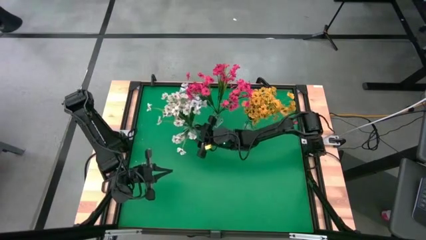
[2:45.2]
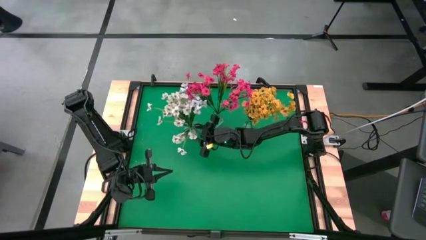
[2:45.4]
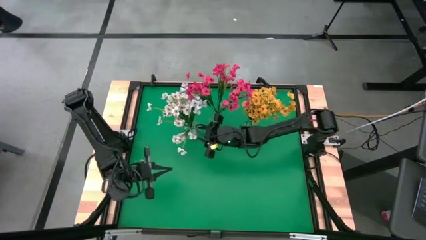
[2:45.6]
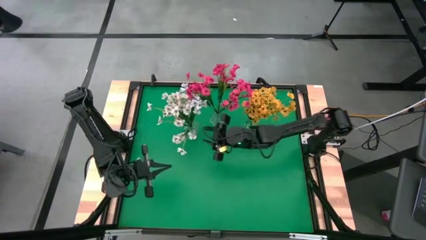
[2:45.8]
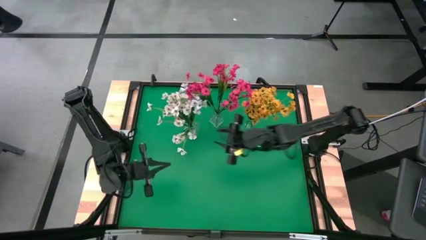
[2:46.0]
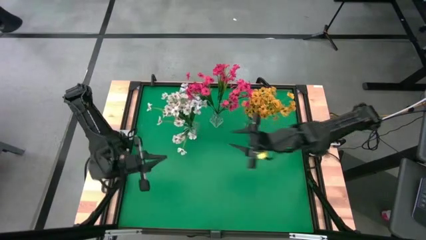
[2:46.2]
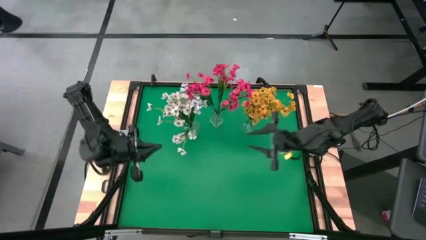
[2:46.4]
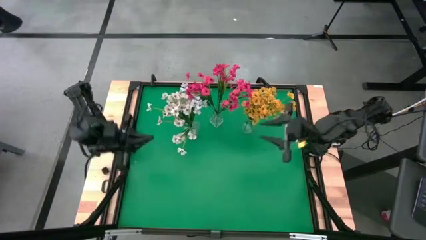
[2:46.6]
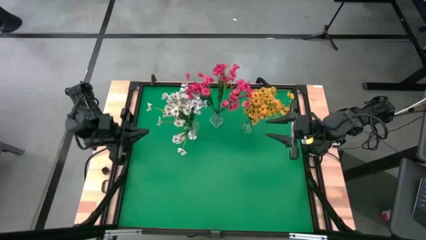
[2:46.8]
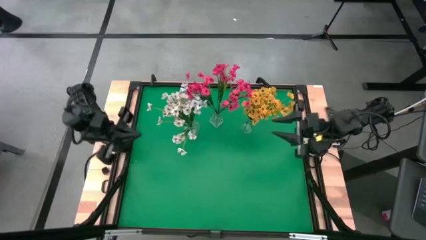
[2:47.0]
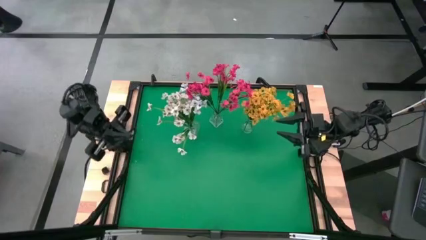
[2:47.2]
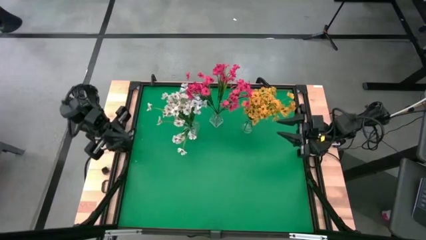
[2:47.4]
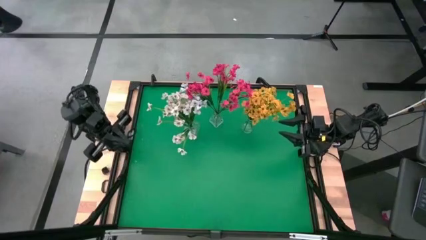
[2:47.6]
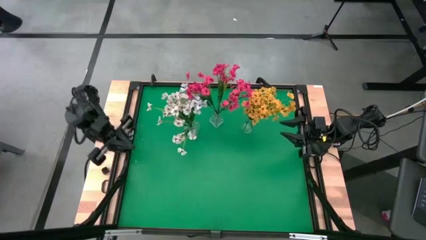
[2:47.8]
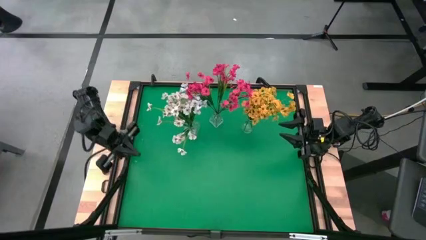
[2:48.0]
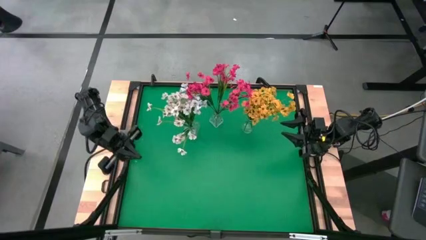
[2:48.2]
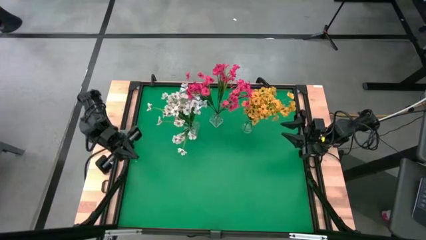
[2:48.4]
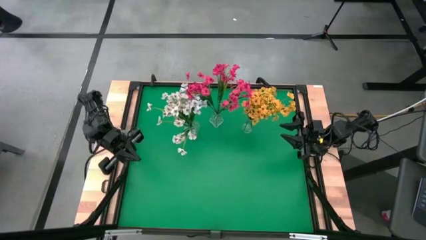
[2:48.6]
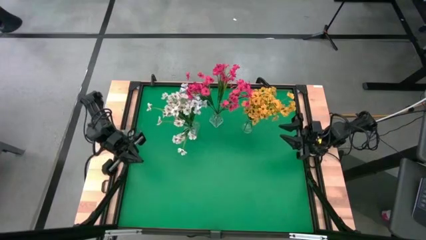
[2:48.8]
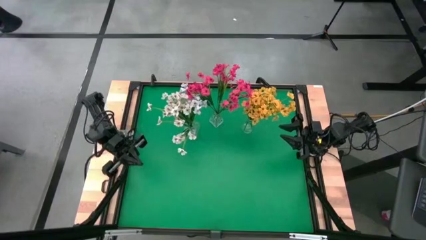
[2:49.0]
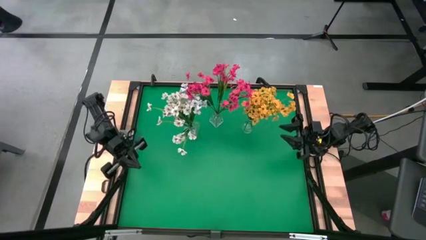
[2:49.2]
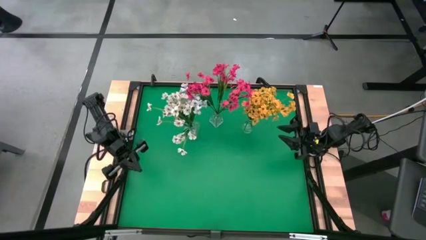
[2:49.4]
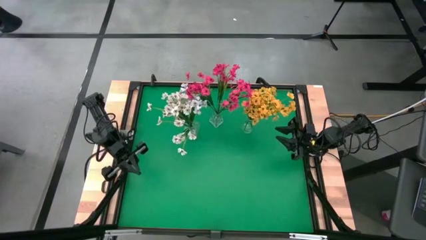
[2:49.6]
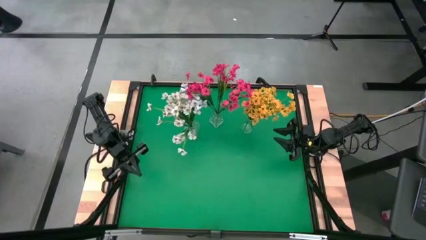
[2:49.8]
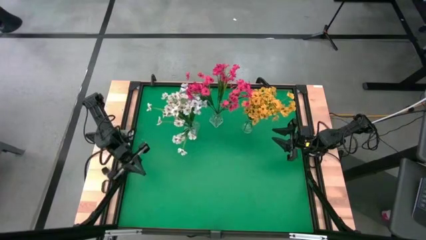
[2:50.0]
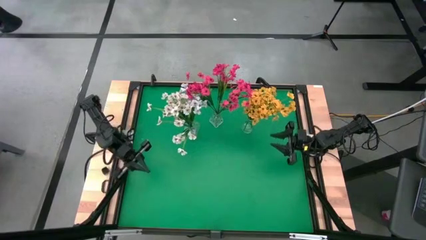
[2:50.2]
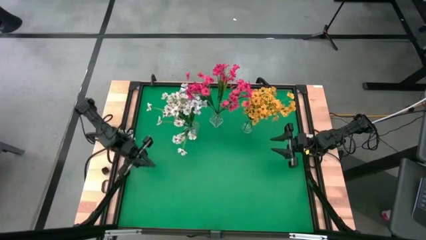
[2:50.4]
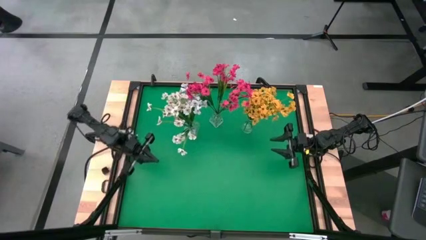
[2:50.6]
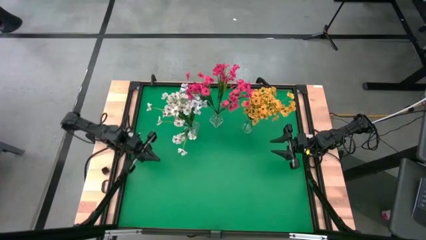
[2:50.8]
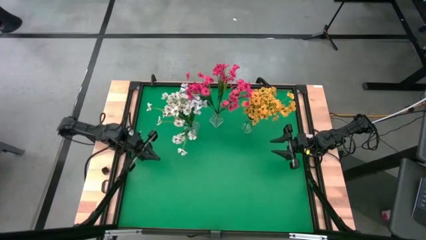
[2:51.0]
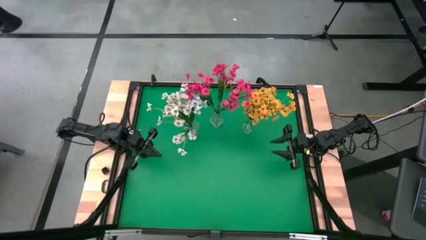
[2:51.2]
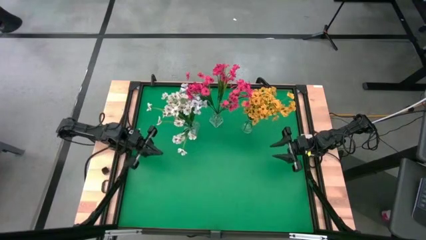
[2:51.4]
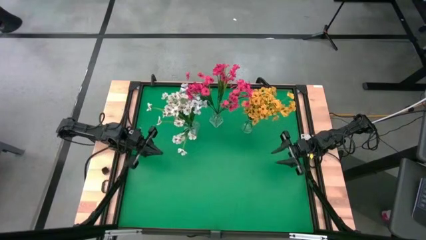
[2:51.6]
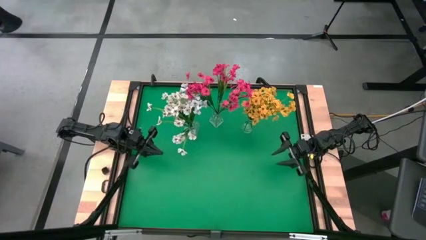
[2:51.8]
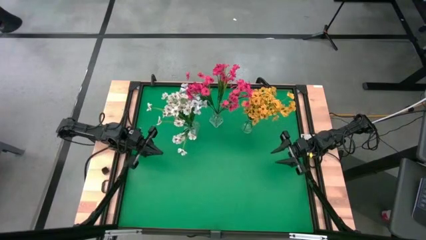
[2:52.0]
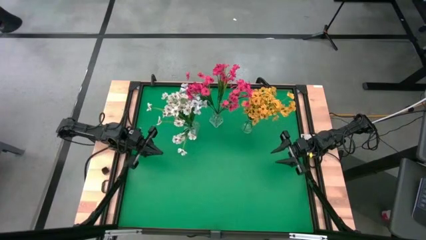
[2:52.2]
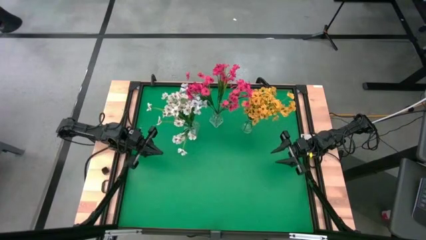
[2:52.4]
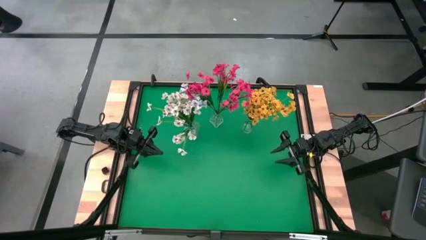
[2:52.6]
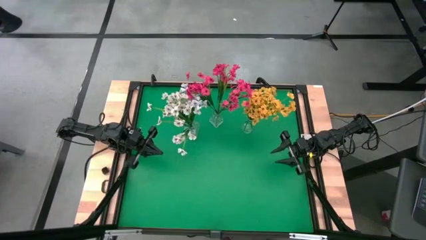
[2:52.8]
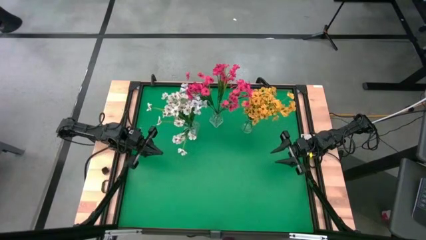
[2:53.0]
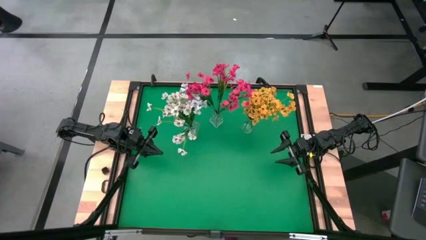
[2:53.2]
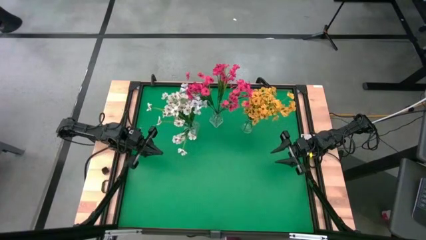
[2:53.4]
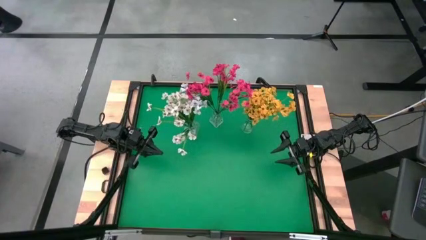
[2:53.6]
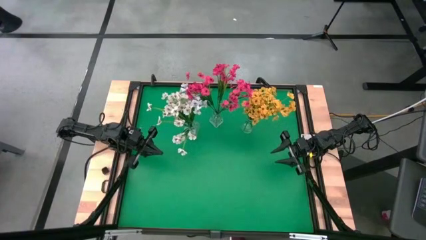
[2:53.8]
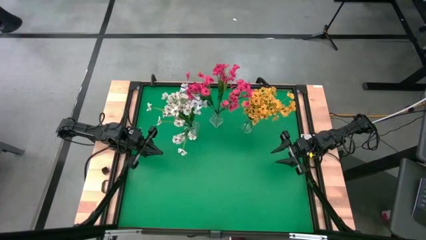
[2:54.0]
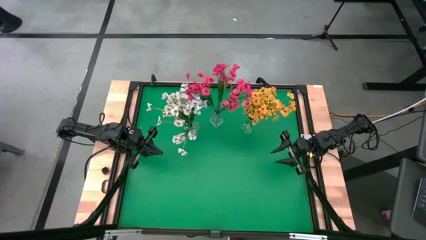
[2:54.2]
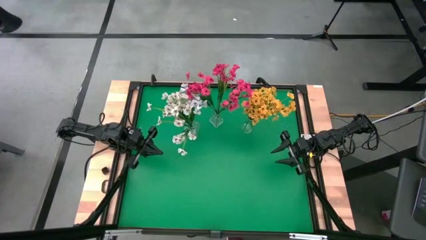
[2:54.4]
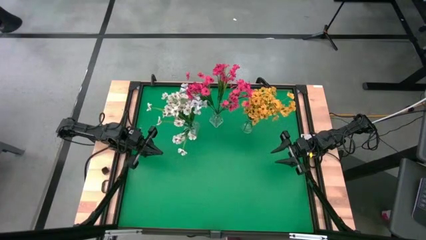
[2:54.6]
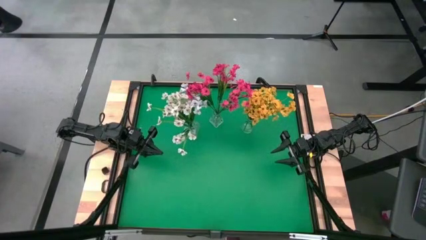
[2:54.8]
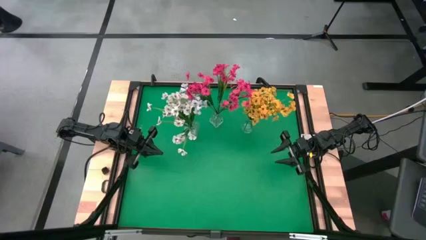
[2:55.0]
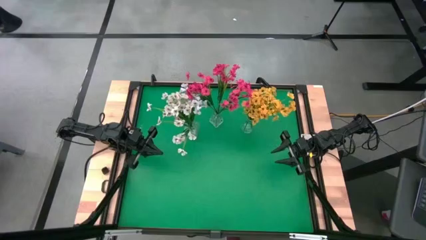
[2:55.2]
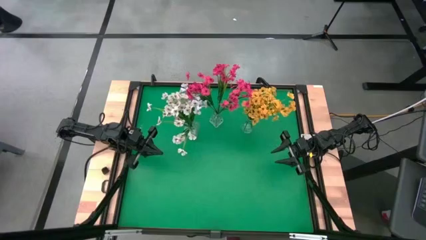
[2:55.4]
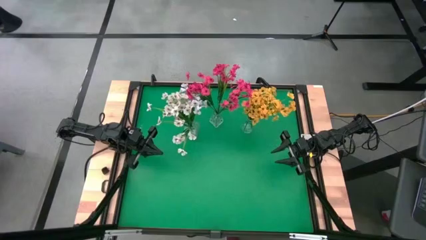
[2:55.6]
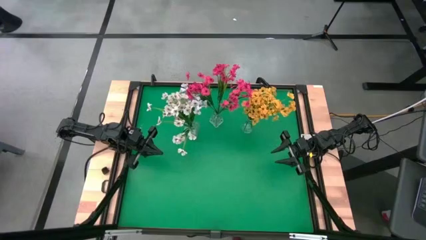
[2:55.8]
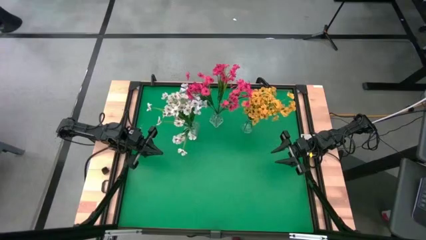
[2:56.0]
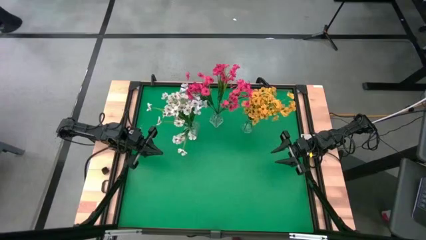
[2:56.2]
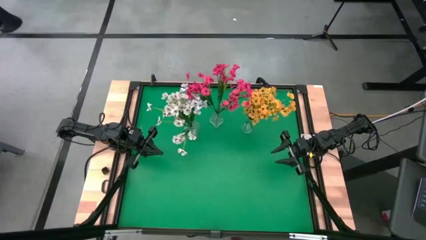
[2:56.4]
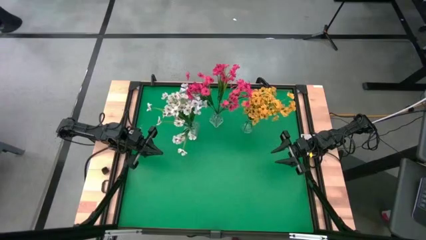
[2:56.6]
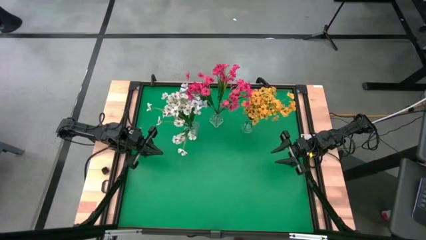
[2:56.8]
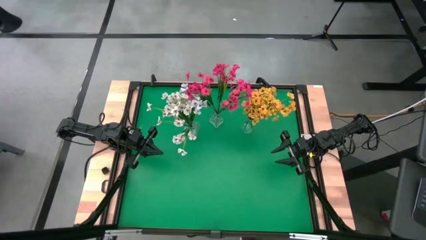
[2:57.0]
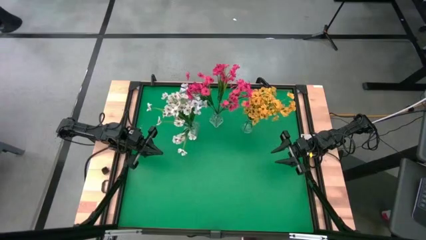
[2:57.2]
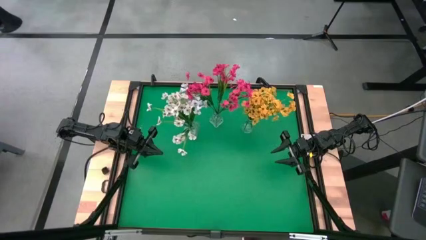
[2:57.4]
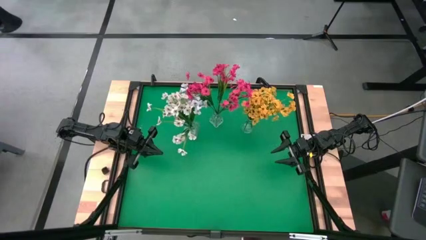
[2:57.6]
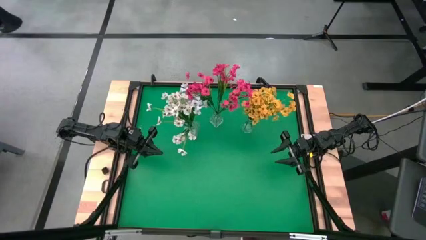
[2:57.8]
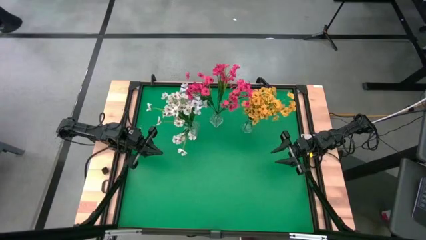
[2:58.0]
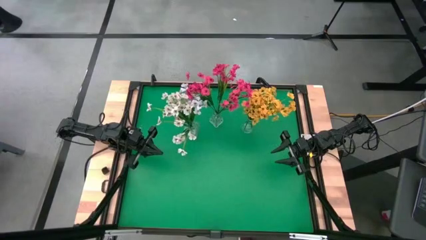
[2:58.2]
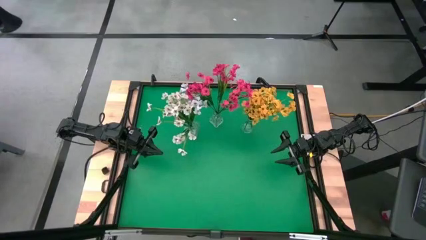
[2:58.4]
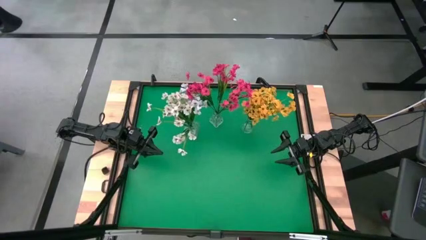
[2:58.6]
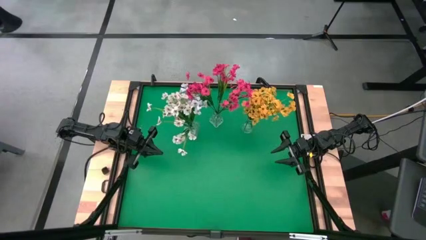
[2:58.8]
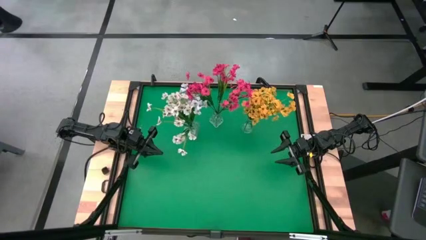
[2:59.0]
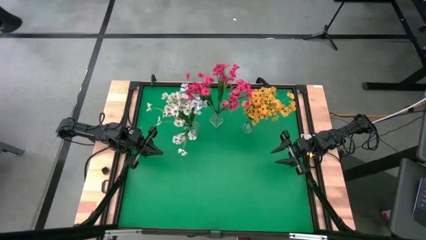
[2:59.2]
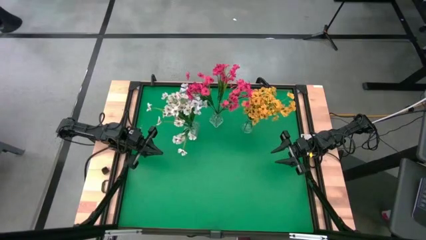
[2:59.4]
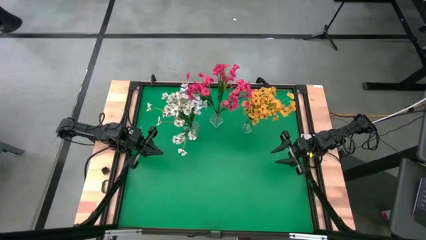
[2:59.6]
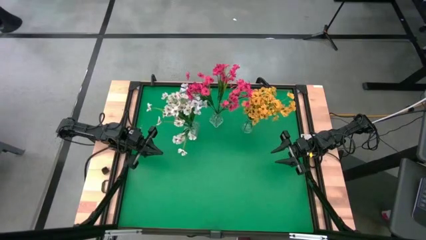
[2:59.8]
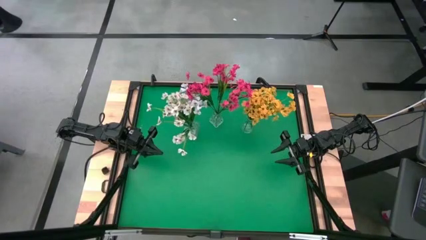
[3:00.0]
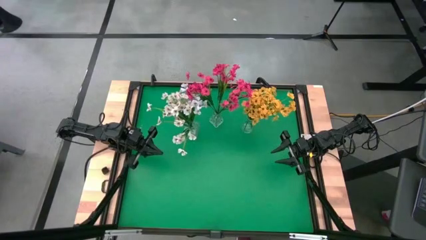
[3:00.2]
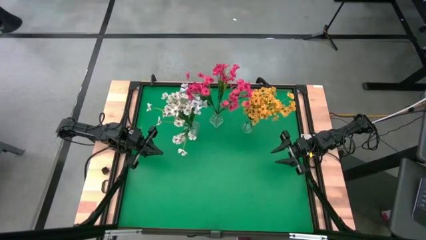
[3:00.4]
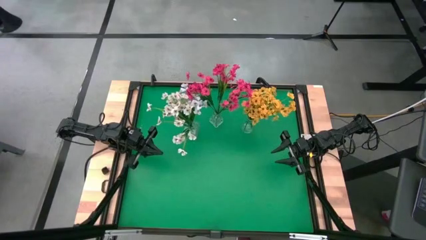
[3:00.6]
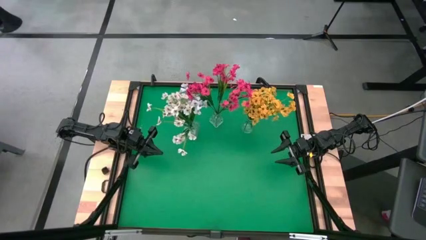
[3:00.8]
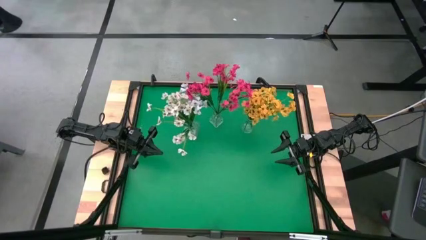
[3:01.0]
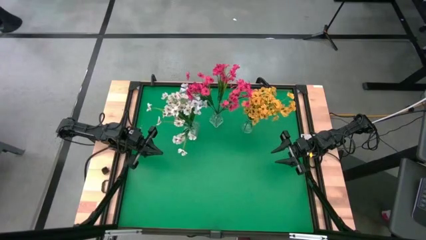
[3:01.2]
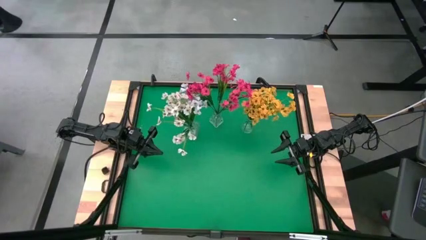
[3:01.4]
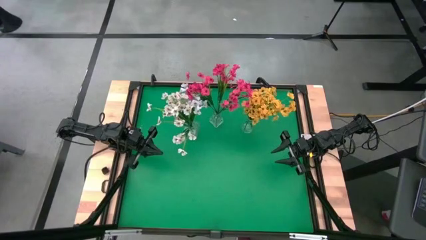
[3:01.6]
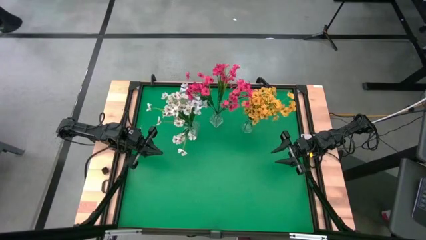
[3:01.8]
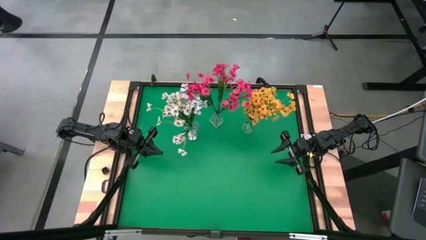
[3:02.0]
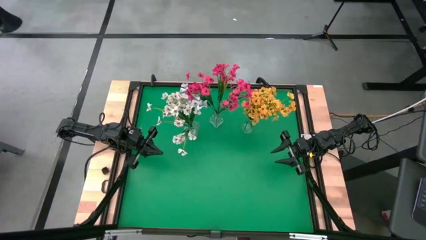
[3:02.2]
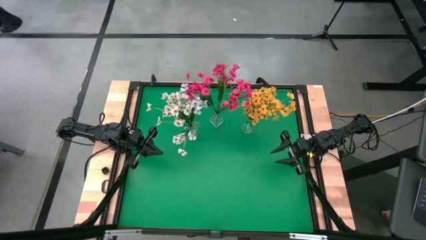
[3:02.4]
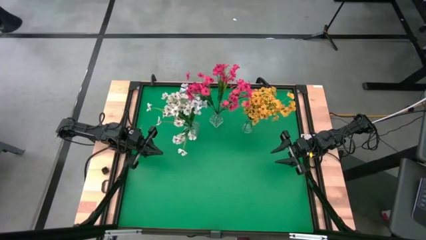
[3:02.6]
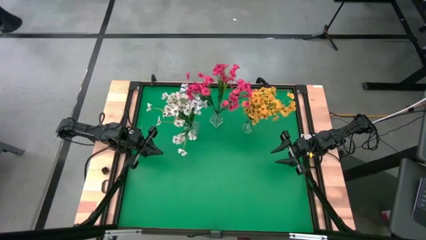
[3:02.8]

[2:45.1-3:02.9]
Task: Sort flowers into vase by color
Return to Home Position
